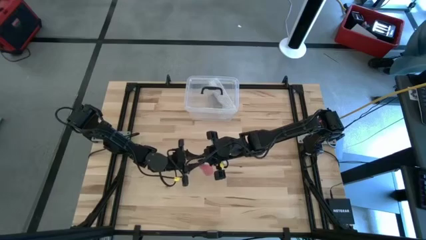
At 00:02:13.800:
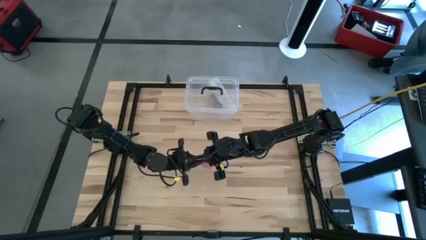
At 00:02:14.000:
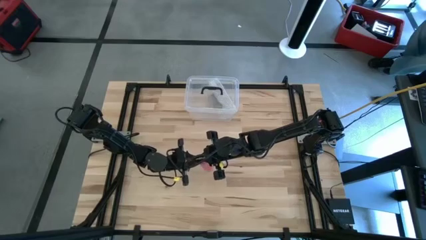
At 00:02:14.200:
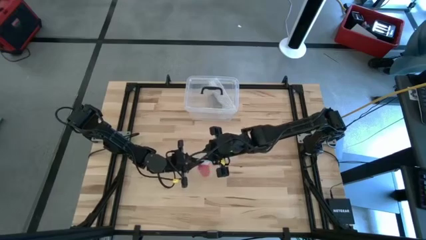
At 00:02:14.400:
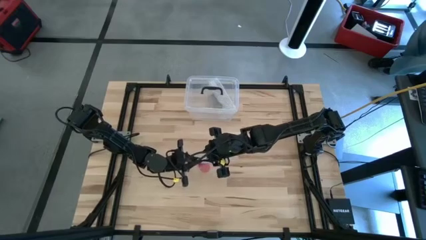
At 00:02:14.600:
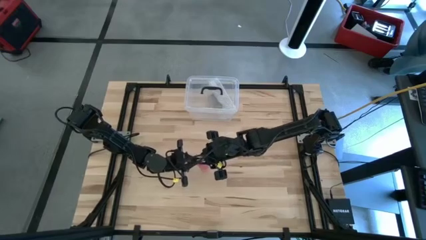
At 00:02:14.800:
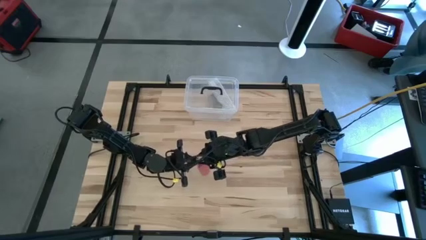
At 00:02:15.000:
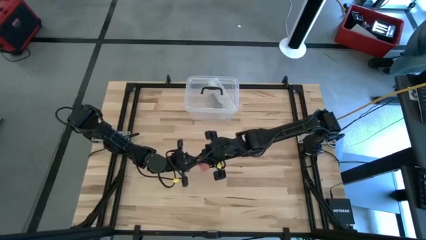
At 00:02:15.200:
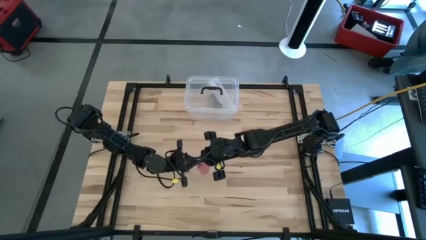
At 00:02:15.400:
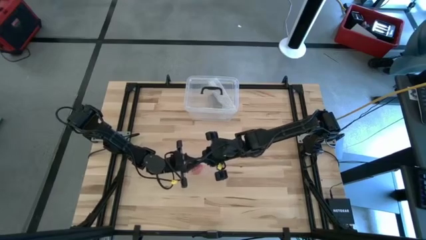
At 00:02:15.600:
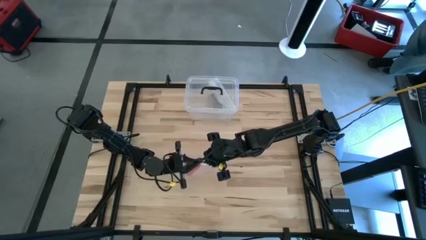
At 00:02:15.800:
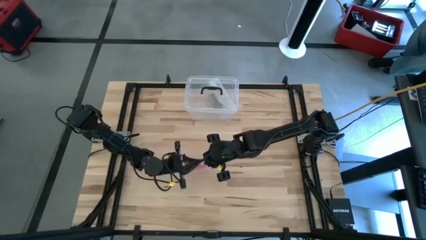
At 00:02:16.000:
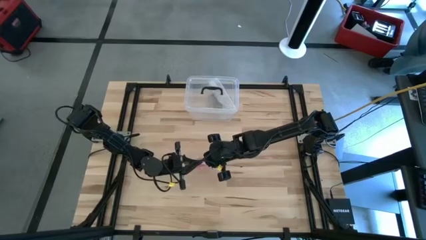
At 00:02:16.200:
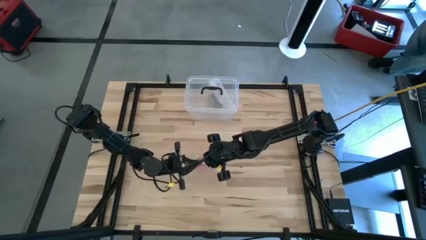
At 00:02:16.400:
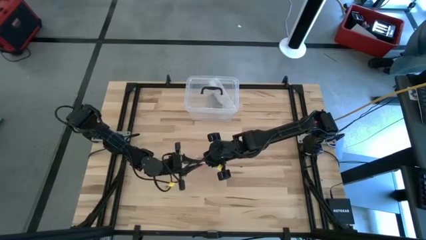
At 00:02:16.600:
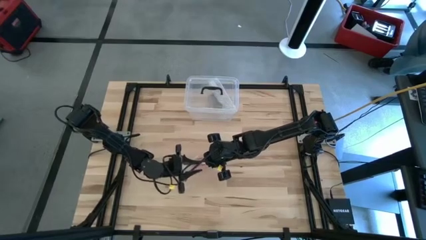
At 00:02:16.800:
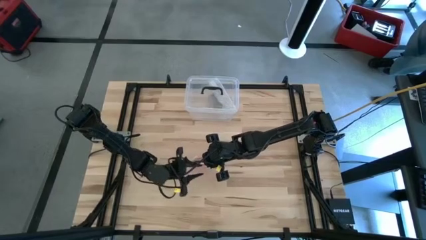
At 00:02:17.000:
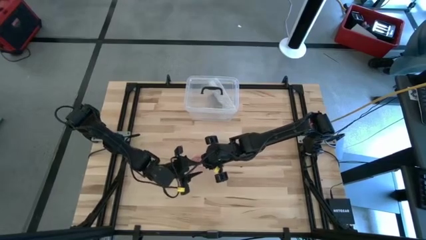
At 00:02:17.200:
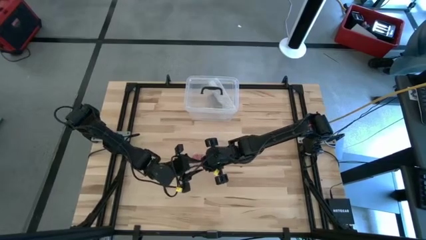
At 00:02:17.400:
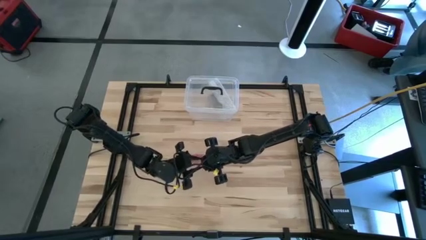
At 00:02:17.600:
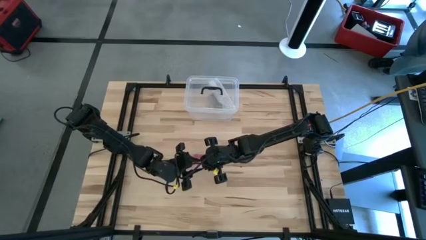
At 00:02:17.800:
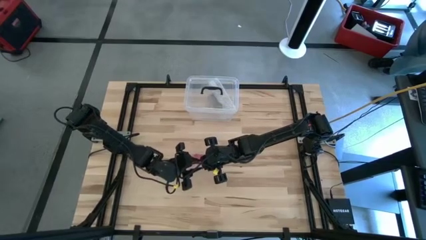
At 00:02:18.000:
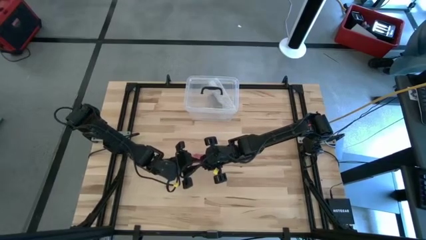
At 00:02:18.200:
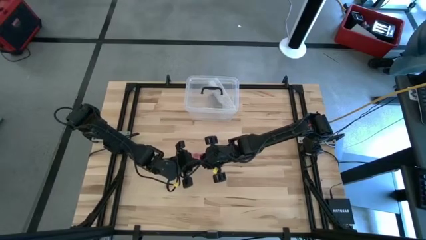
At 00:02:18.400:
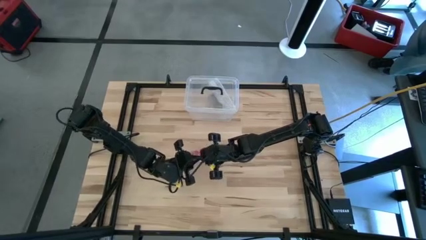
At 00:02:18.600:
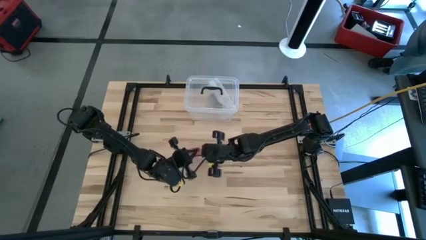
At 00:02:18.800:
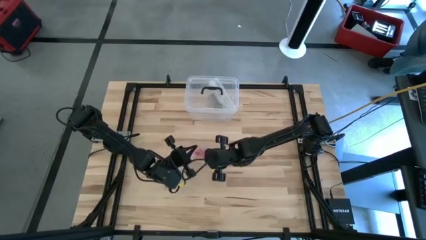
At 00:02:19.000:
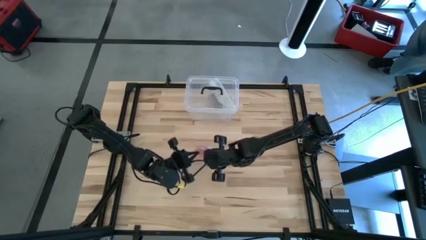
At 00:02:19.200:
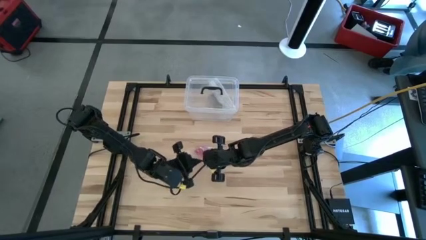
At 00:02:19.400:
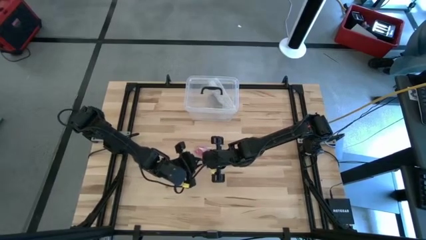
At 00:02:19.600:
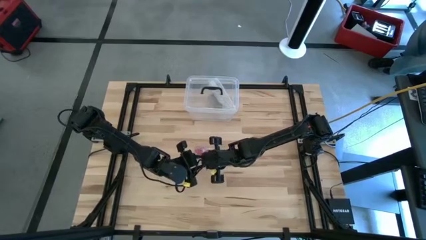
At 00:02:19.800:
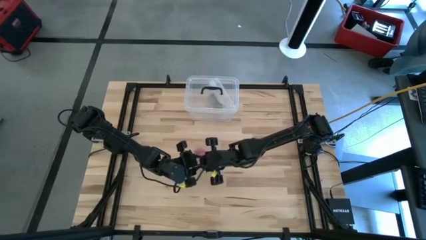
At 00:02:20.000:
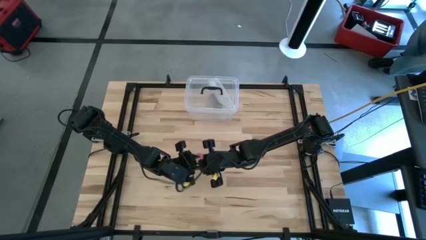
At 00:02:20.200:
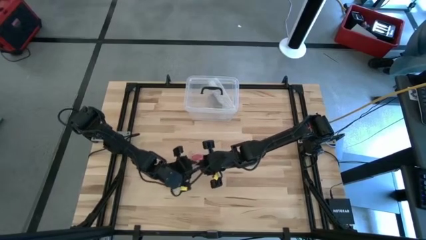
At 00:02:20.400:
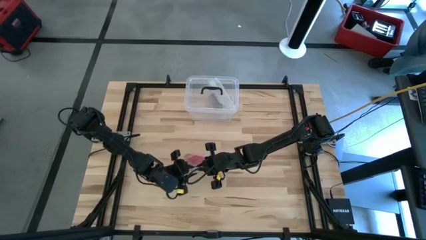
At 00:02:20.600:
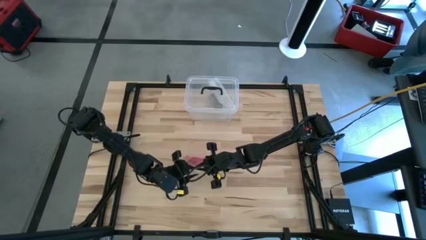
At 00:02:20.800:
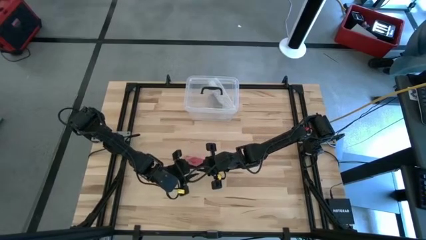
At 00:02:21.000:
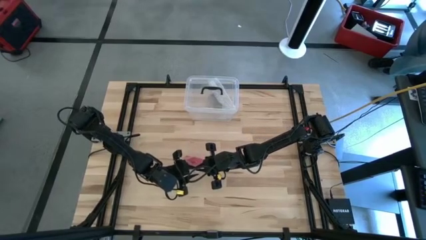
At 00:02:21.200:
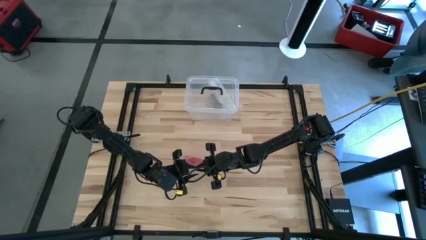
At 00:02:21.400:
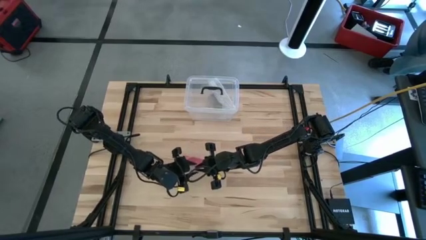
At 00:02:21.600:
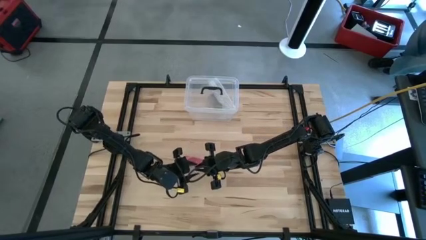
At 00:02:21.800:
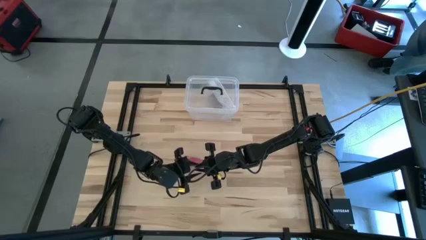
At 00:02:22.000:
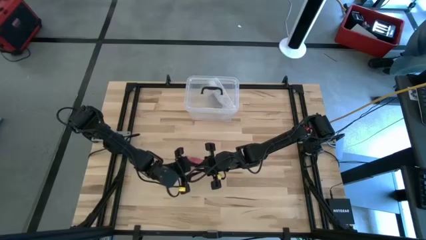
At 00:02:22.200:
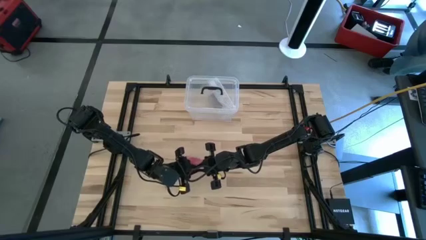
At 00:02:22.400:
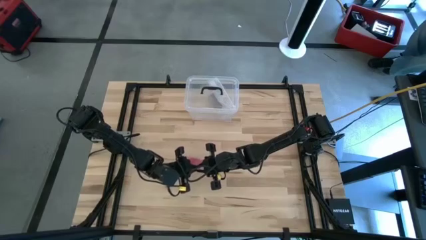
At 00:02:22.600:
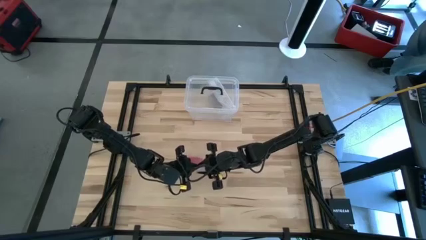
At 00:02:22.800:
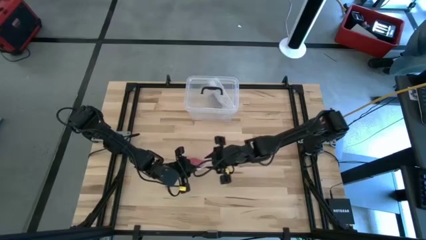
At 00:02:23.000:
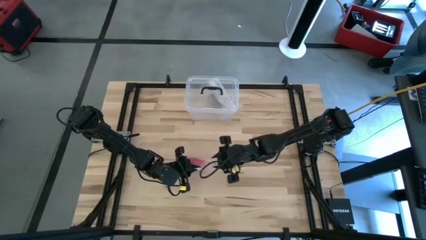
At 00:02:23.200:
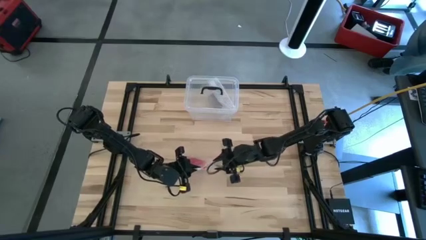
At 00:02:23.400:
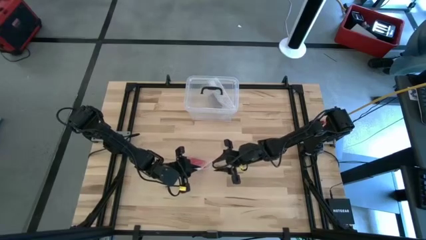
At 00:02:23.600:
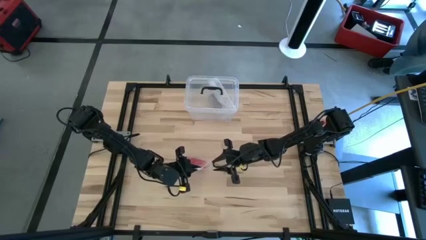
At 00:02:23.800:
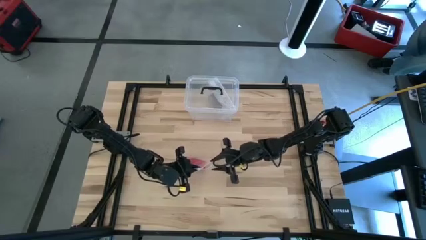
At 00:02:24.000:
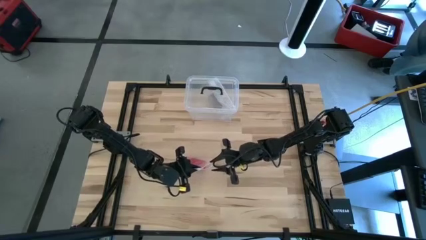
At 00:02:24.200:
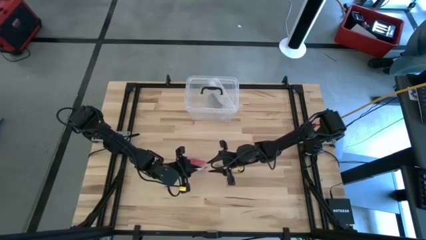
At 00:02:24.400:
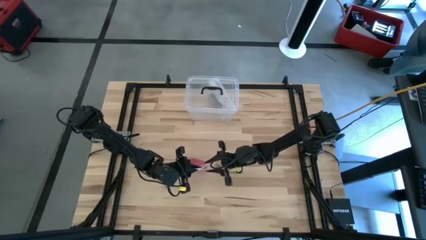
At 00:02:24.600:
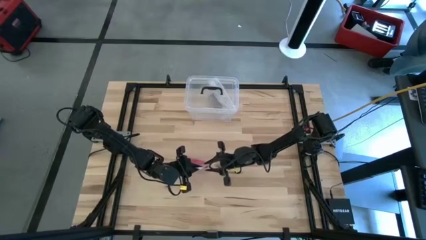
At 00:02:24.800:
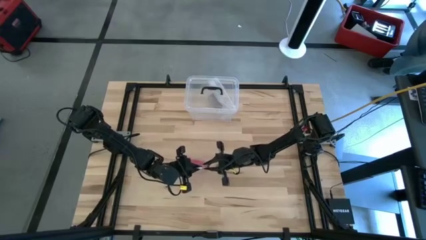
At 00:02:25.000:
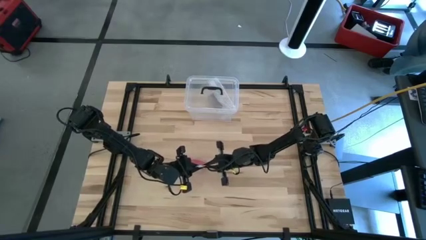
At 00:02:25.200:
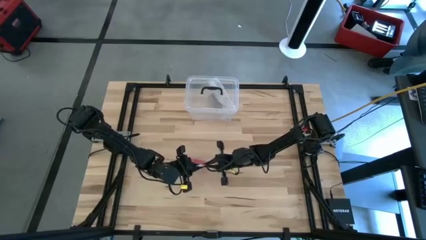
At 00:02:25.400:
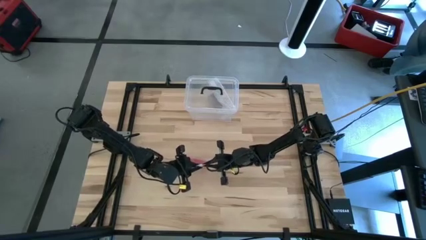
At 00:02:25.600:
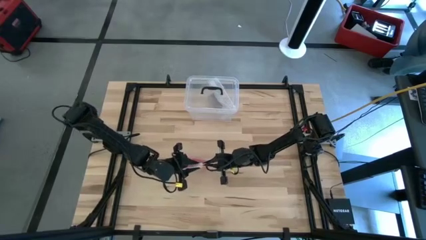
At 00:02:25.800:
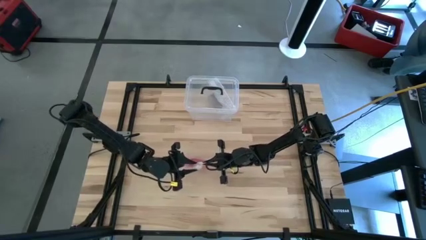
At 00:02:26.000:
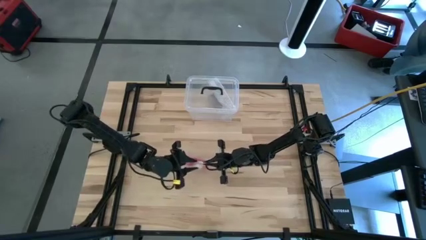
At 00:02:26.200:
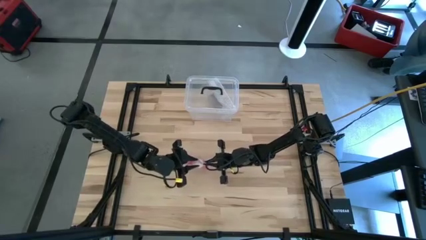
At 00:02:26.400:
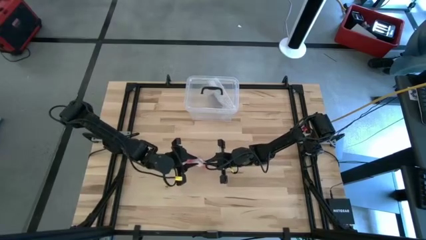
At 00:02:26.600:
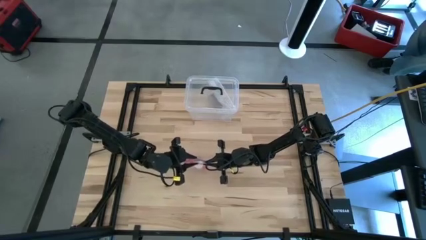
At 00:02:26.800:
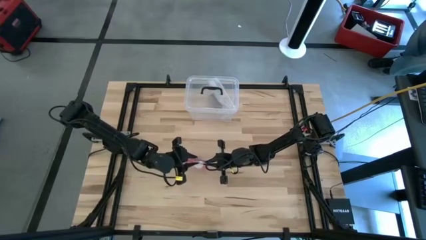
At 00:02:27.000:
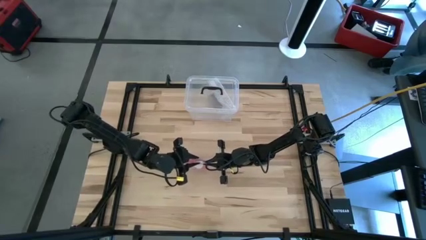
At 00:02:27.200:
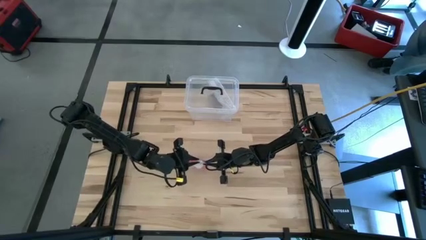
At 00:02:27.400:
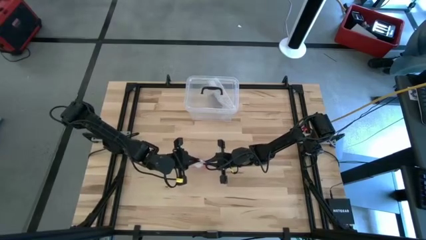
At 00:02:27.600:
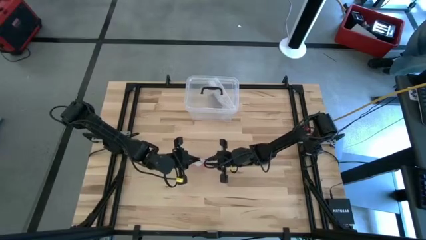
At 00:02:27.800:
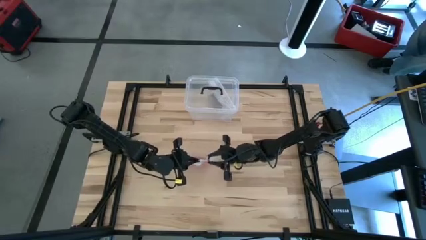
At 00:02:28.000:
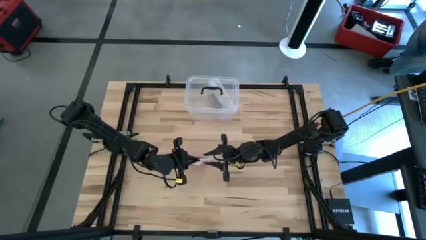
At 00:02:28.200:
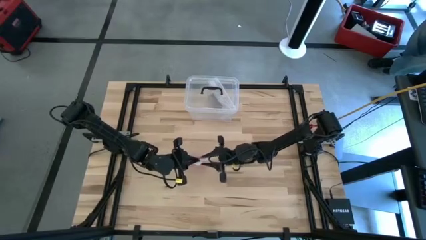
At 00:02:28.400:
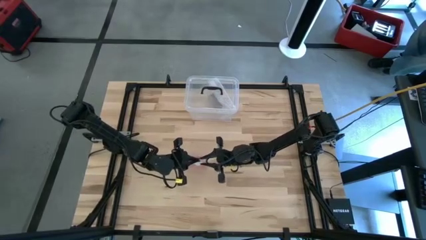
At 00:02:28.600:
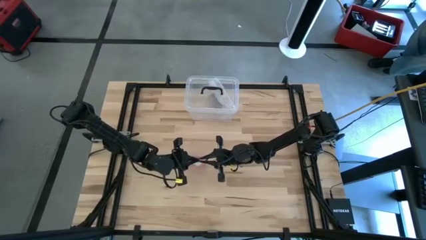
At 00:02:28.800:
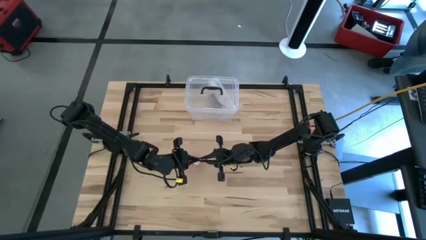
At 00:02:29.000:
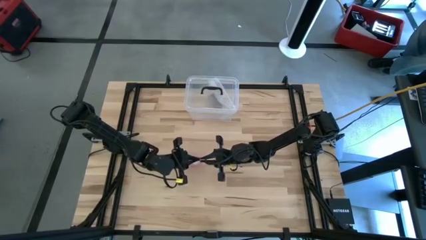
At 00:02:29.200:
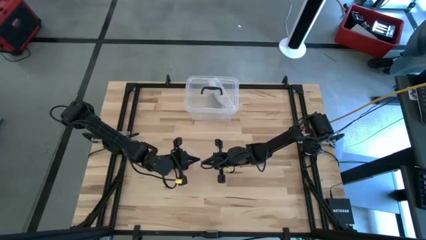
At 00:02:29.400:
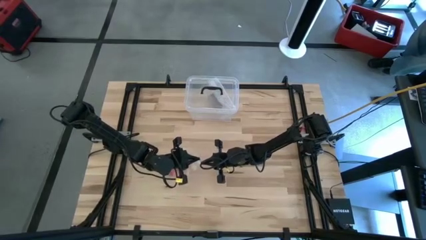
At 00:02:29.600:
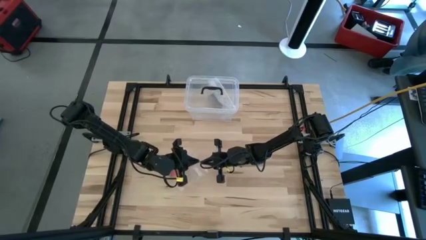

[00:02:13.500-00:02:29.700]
Task: Roll bandage
Close the transparent zip bag
